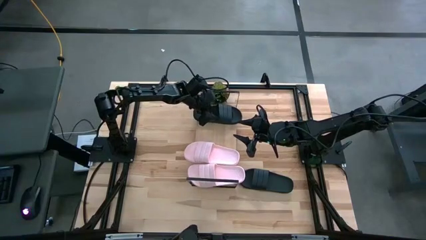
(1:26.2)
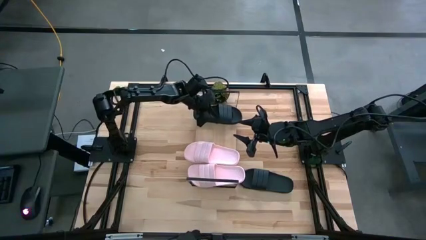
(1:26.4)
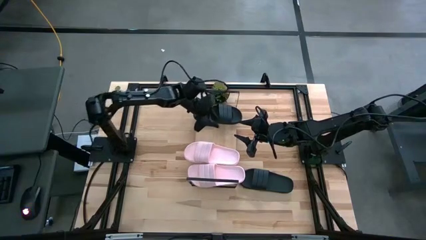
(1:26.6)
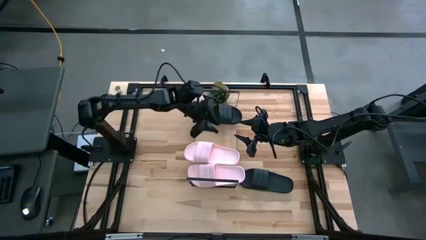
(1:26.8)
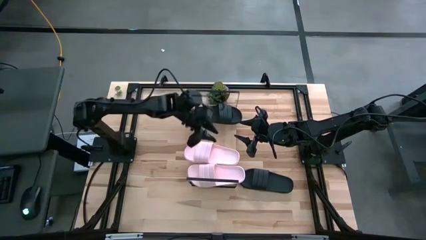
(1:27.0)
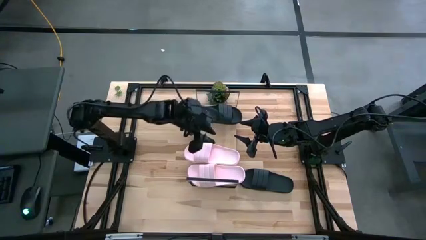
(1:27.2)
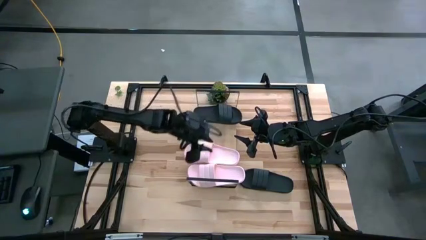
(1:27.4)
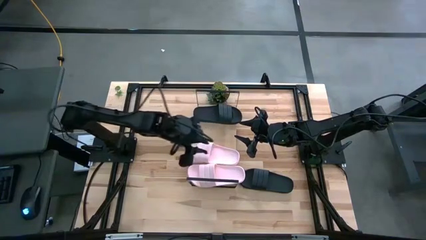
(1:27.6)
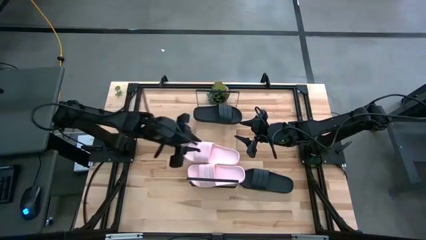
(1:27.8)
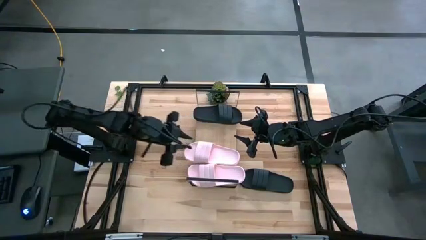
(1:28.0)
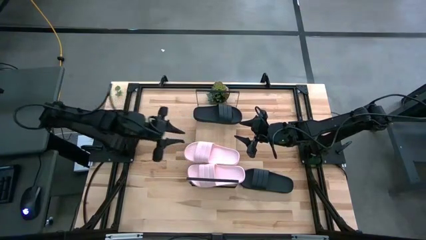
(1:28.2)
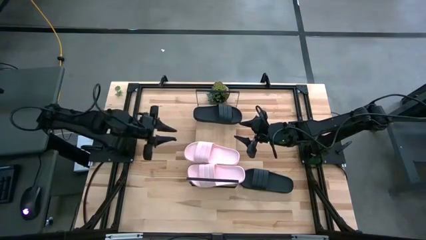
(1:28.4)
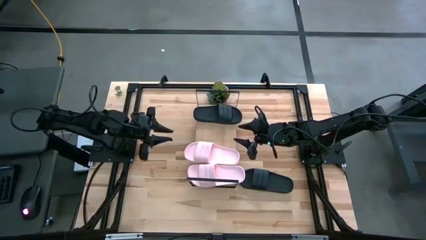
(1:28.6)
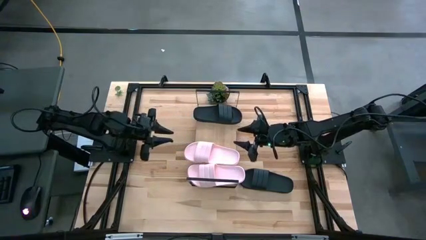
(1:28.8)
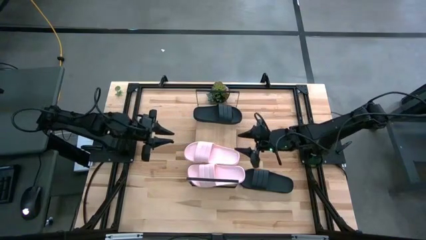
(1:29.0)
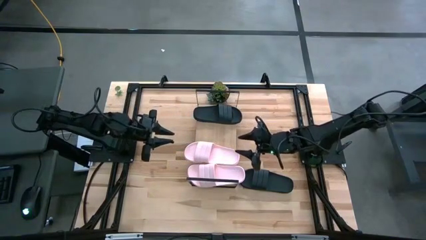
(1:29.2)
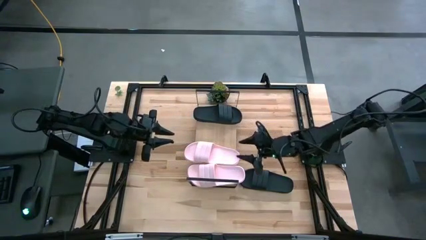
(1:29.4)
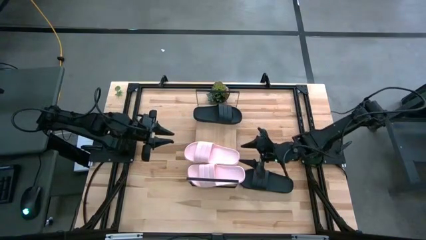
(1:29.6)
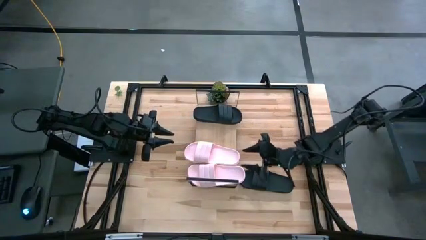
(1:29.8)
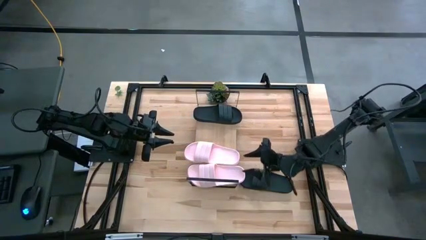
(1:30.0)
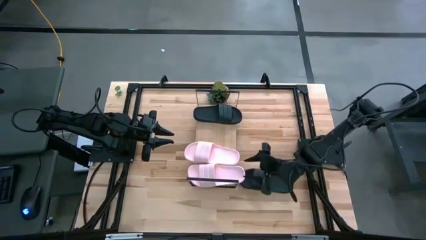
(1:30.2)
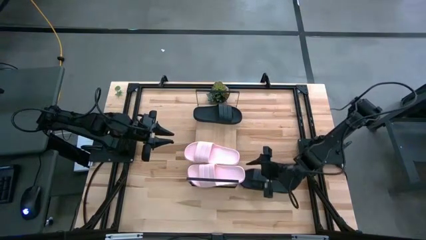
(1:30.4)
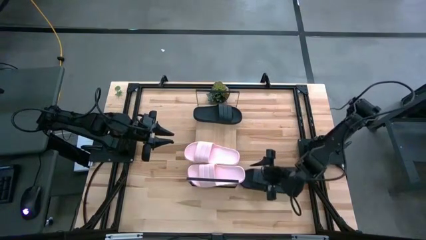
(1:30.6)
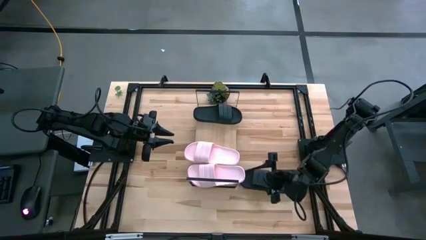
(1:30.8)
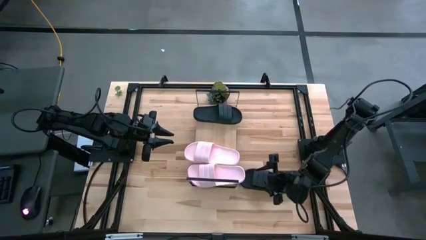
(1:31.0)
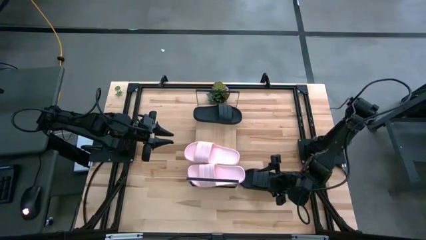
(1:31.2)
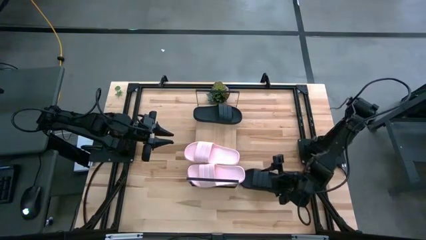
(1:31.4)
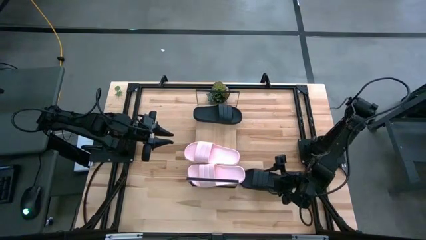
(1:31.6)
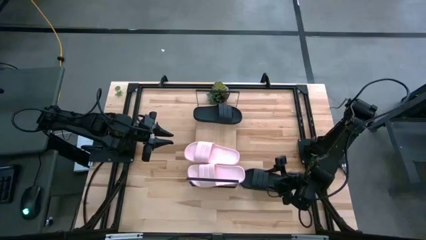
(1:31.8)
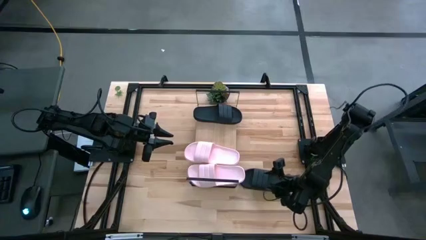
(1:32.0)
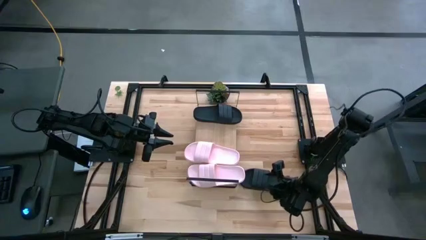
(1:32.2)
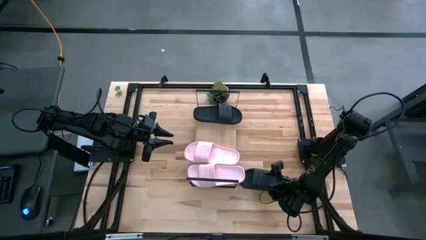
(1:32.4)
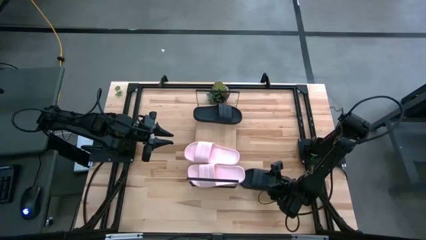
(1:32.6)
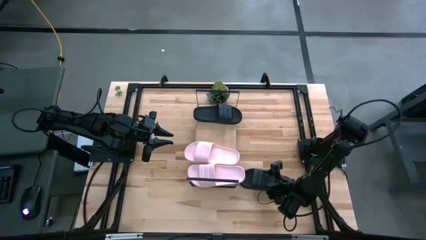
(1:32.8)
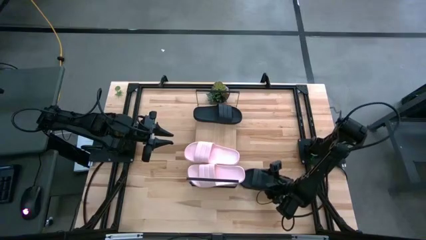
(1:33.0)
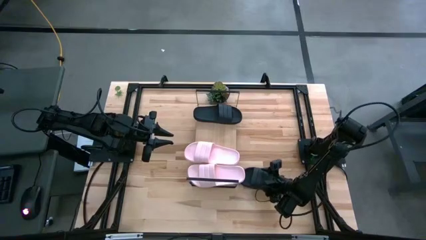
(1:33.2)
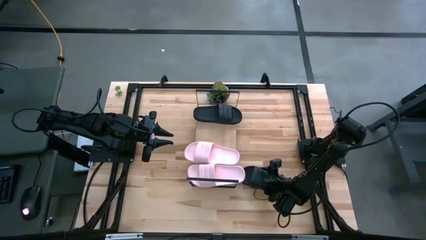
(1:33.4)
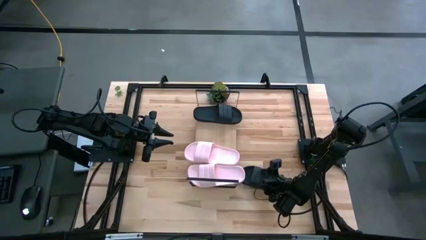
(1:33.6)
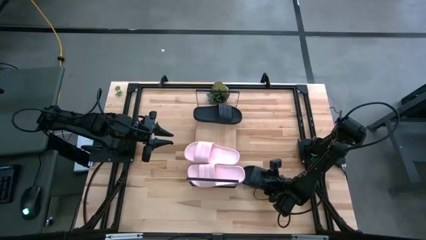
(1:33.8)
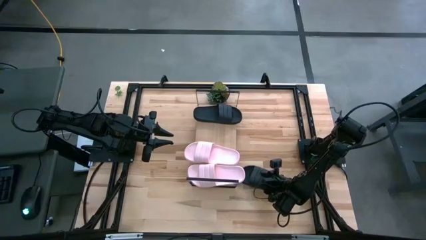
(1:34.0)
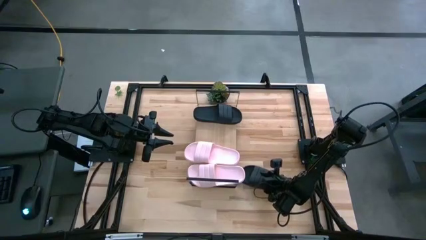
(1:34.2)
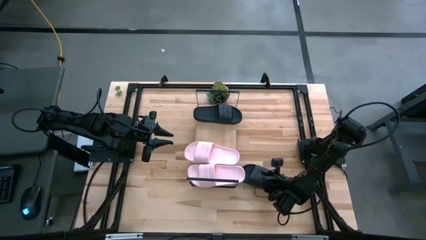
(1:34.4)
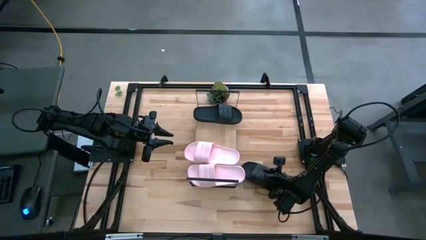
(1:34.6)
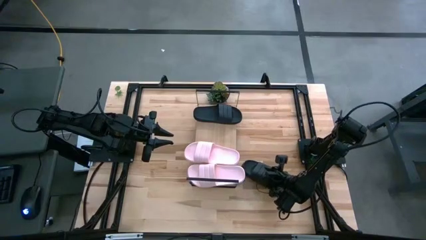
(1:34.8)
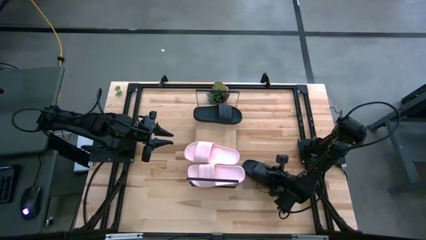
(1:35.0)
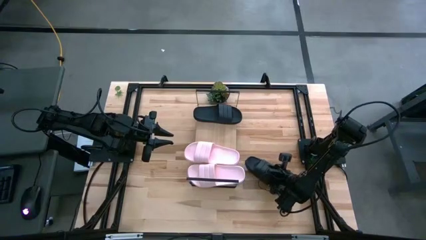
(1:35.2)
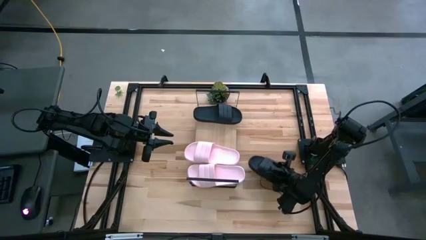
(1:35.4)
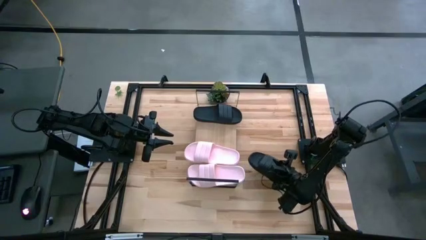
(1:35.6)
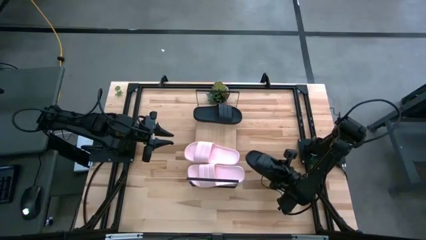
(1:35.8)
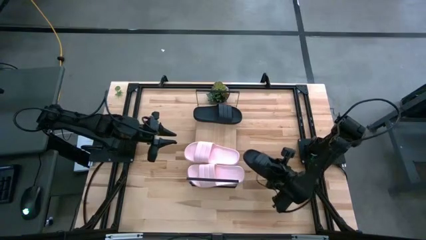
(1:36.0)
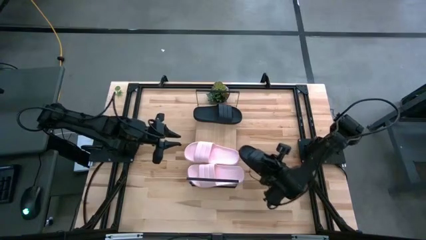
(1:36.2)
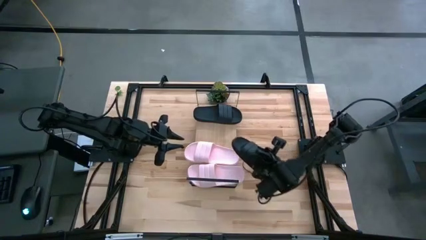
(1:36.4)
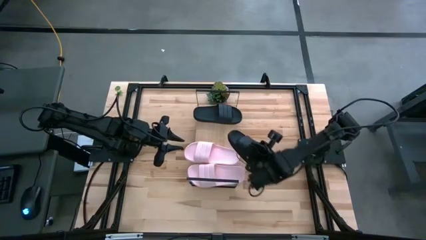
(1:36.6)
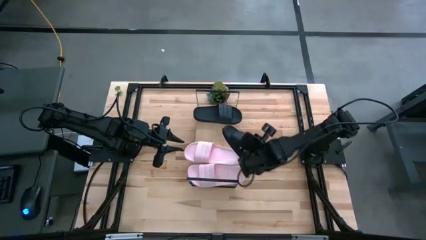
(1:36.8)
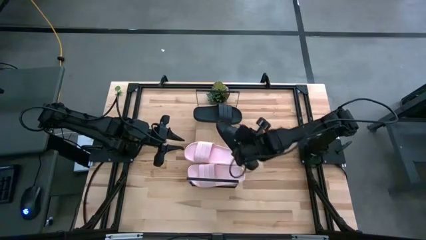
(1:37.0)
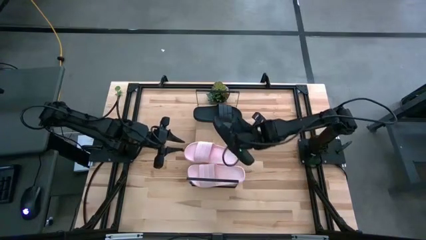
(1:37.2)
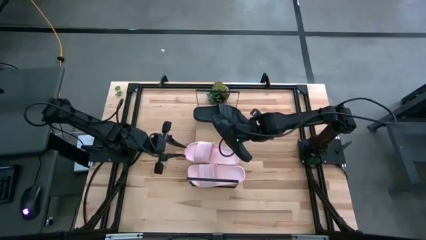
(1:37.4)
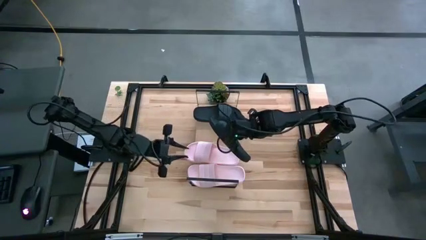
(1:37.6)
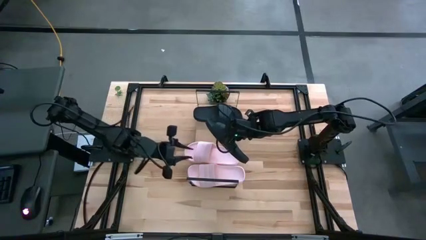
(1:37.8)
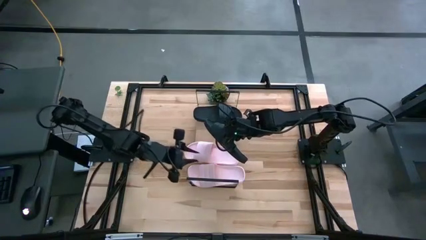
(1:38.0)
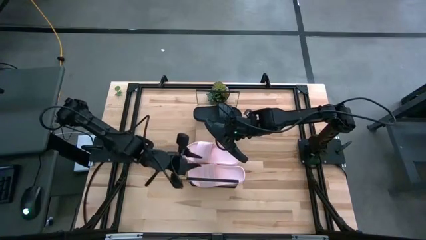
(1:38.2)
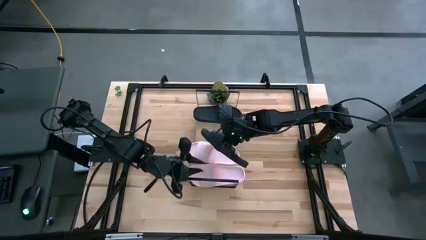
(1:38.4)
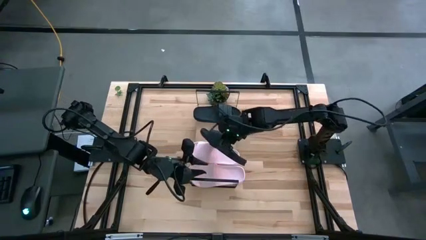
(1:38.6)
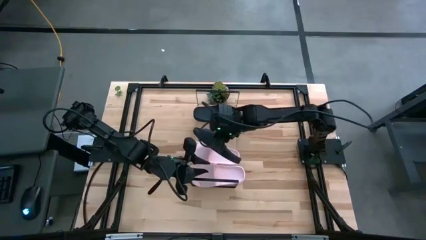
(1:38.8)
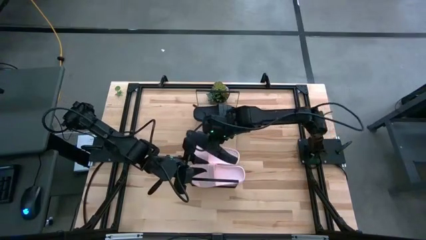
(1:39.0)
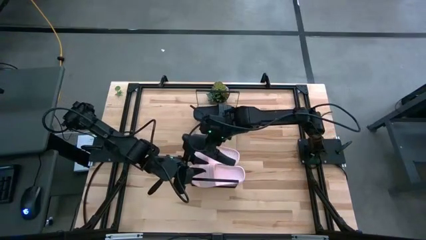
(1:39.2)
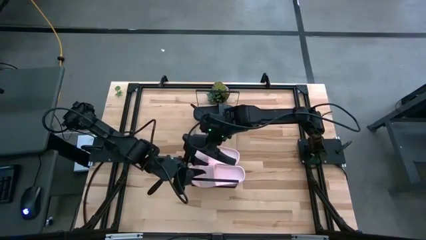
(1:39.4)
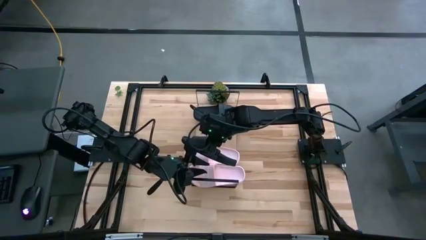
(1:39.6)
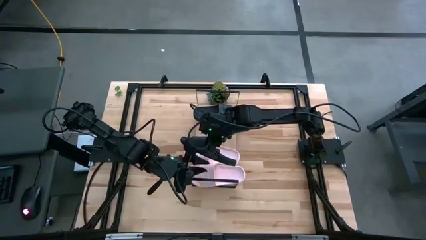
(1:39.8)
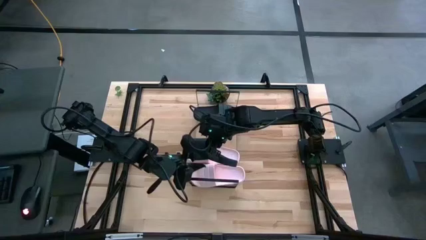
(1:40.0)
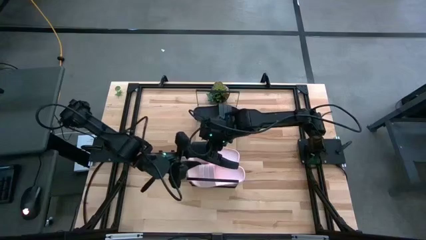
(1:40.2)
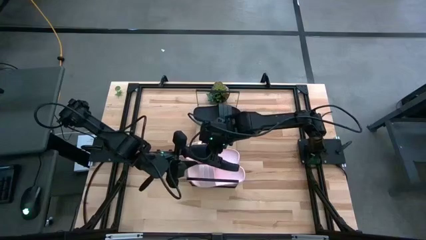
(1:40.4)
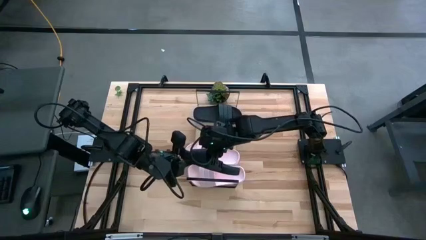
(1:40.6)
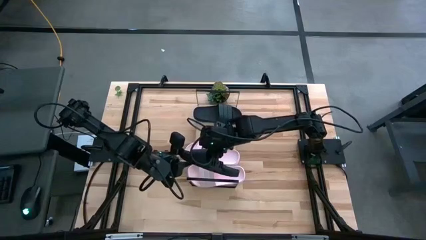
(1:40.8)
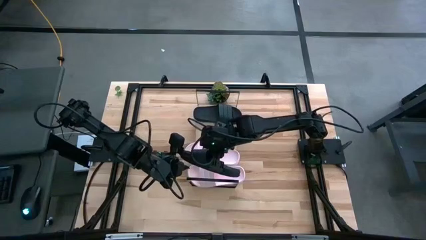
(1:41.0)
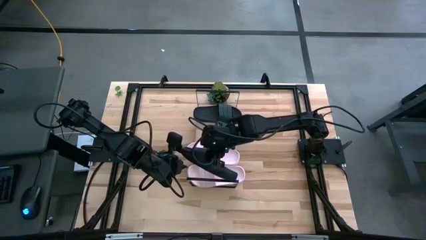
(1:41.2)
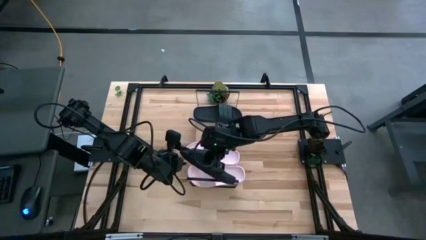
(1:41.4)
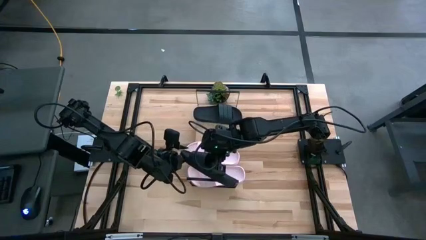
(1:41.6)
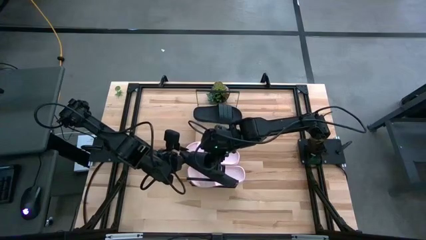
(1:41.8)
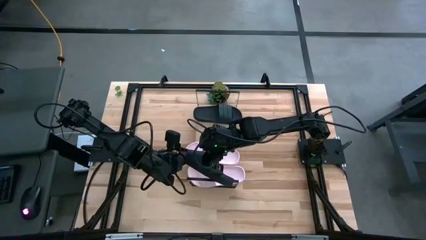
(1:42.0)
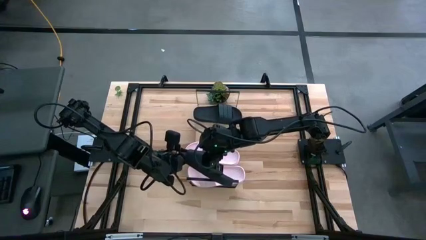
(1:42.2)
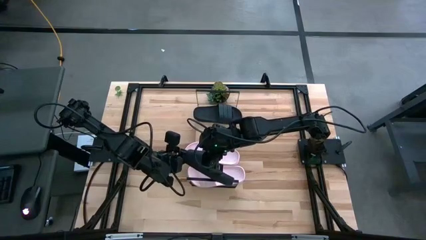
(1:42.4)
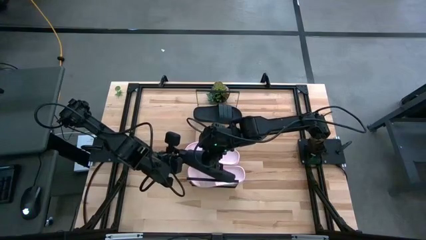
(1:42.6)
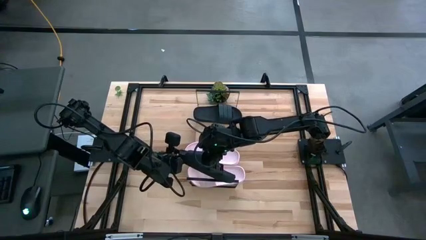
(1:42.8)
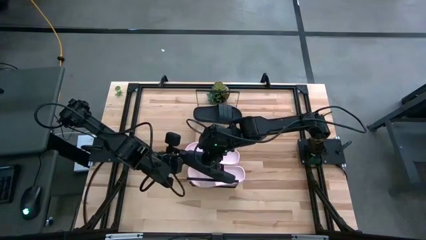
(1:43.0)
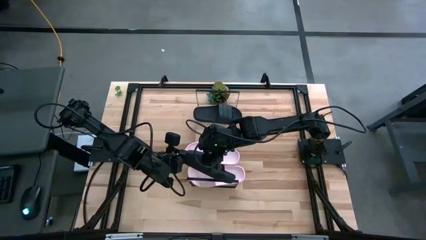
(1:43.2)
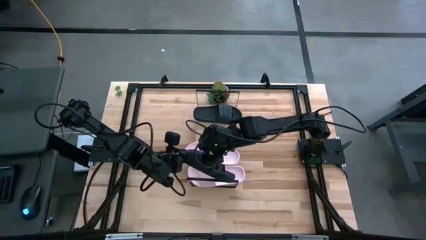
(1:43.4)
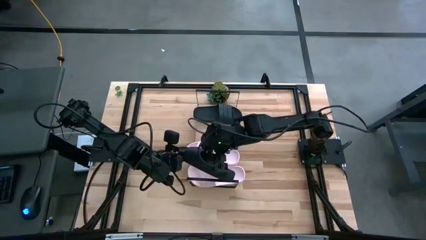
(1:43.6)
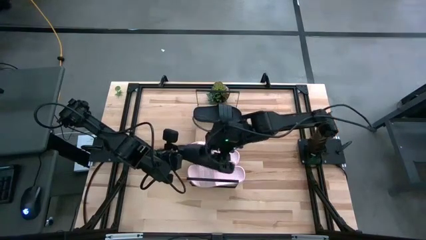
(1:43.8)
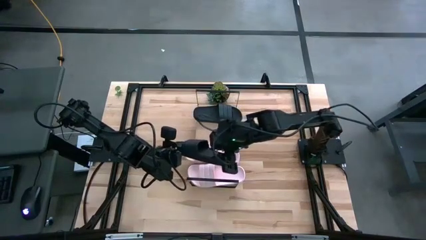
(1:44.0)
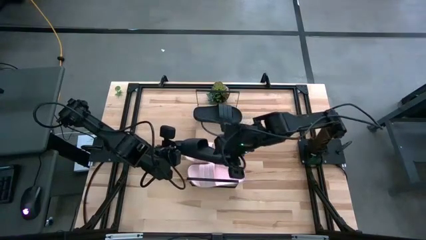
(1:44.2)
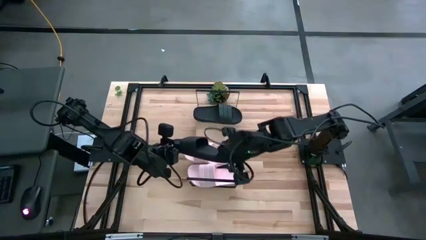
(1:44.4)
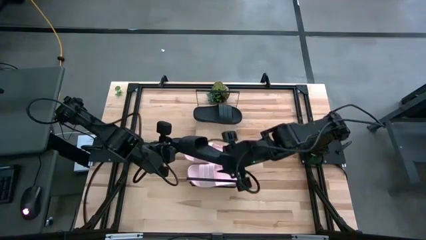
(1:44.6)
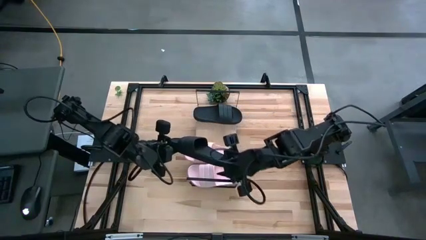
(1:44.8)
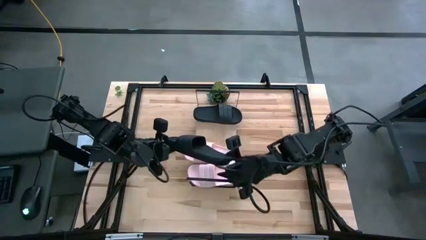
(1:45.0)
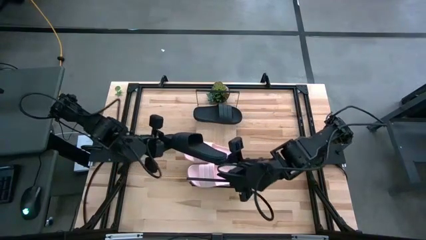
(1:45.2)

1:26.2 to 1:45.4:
Task: Pick and place slides into the shelf
Put the black slide on the shelf
